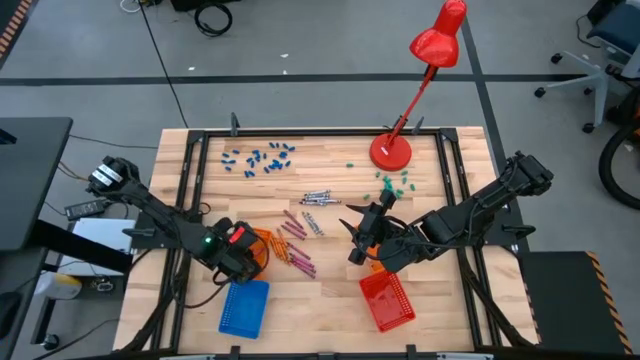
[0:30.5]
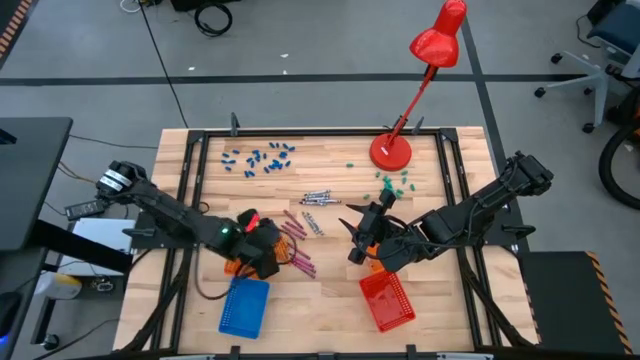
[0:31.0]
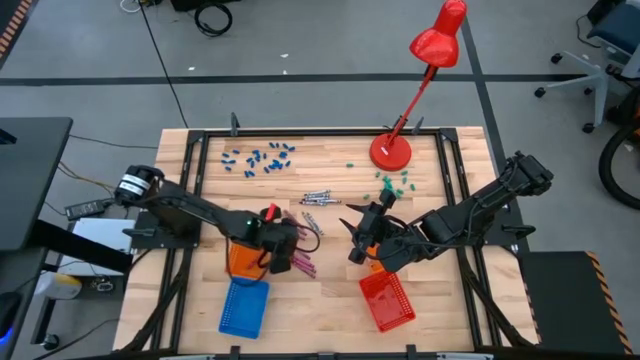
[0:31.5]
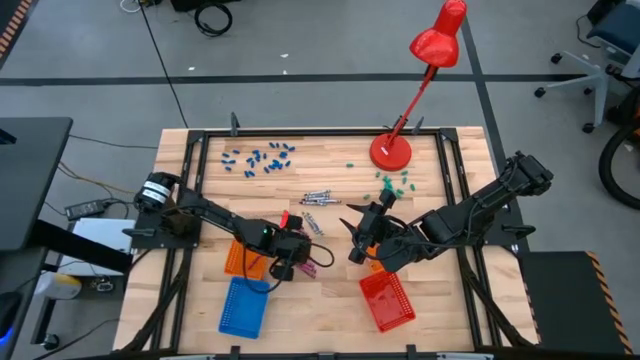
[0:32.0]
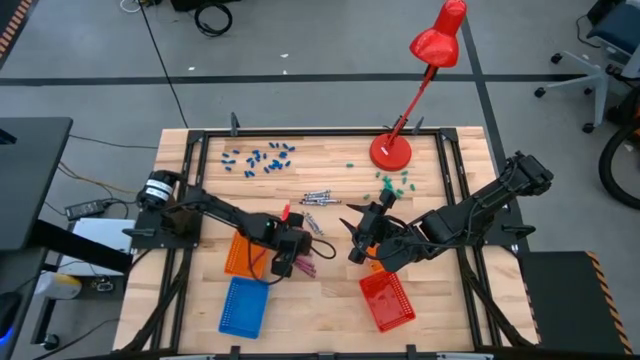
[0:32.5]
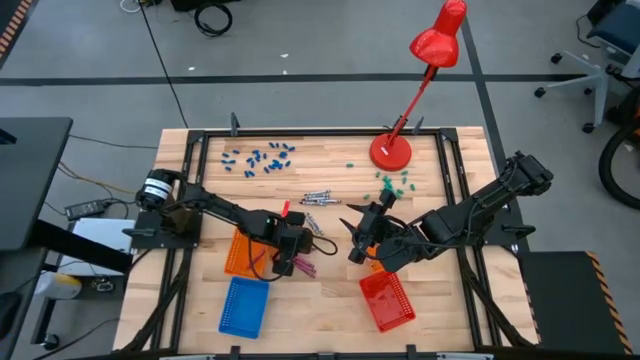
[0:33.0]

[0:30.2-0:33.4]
Task: Sort crayons
Put the red crayon into the left orange bin

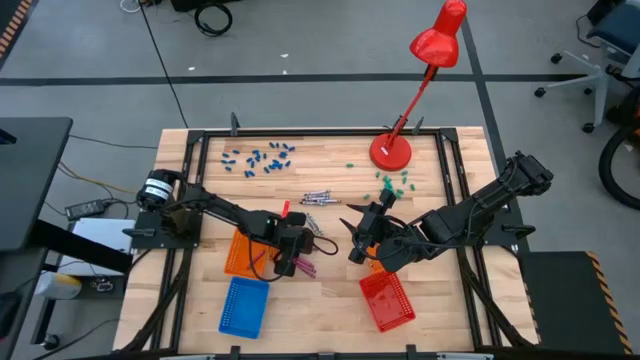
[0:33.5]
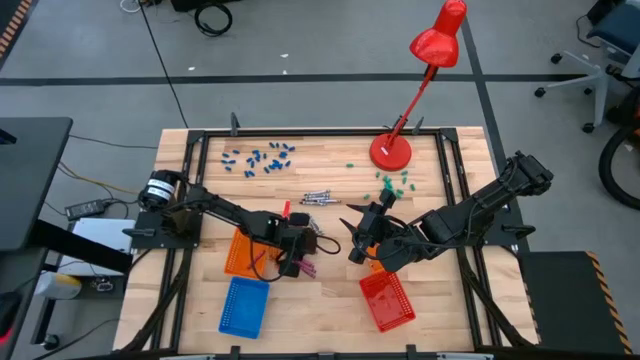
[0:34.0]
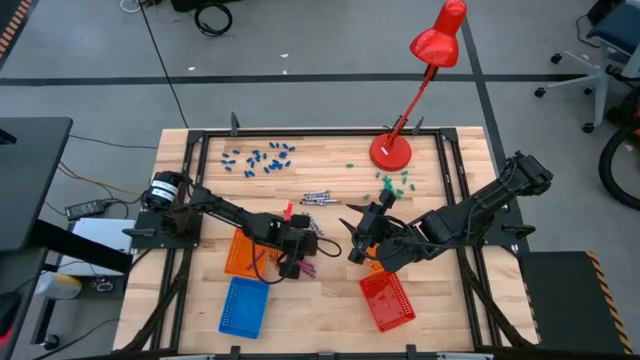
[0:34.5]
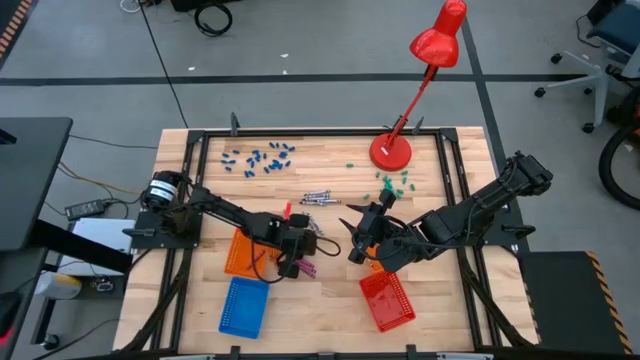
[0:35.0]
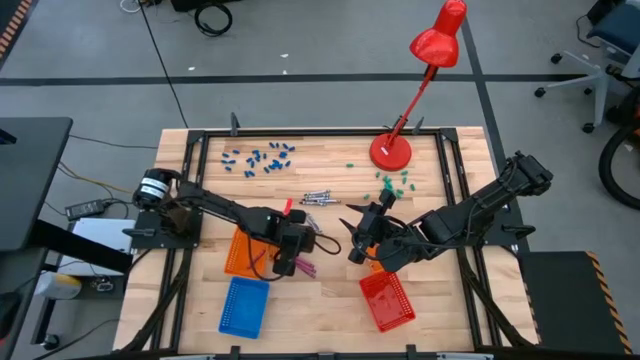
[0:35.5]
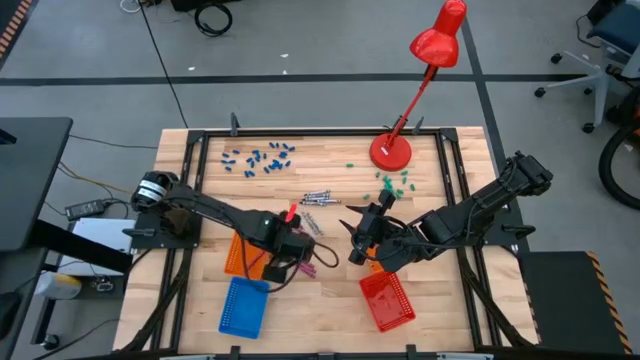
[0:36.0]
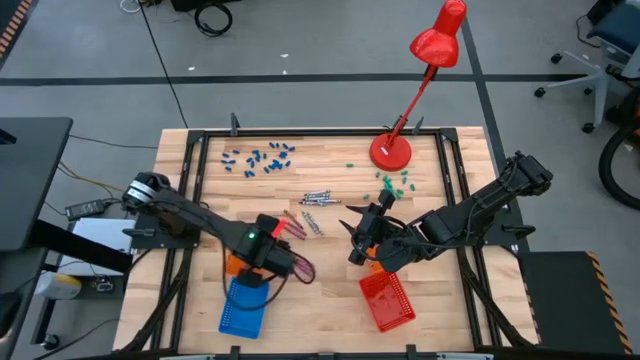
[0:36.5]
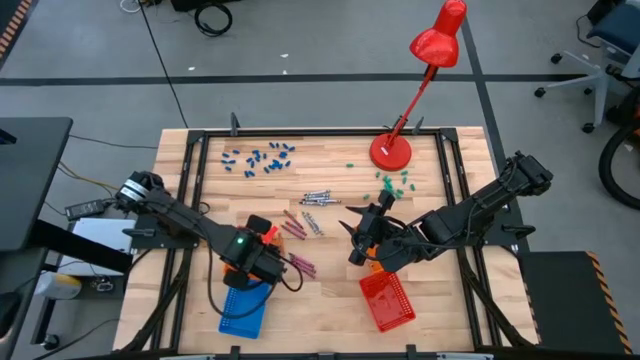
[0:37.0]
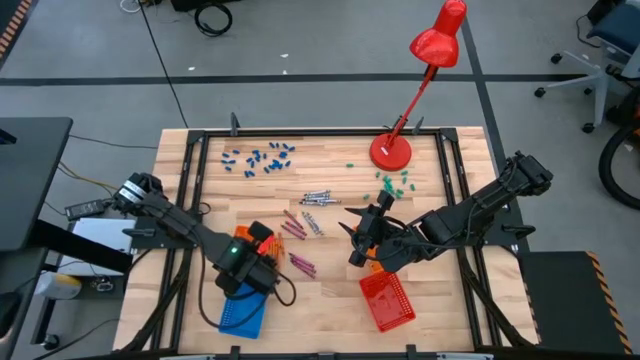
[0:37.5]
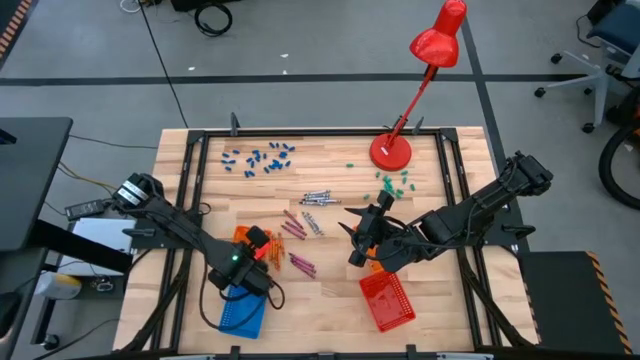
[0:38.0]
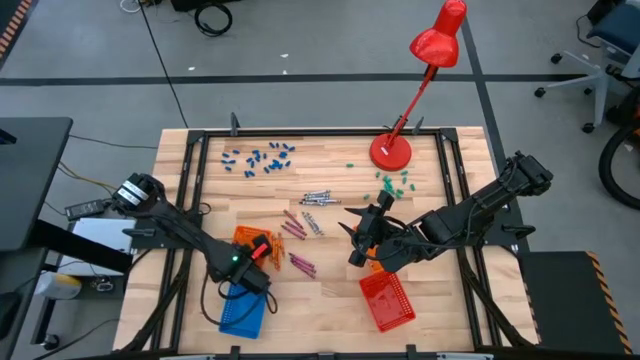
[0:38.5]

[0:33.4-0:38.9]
Put the red crayon into the left orange bin

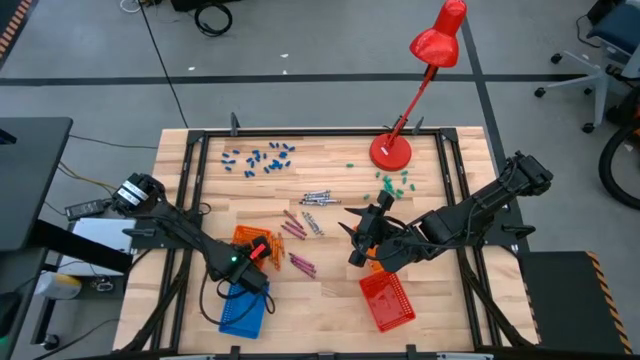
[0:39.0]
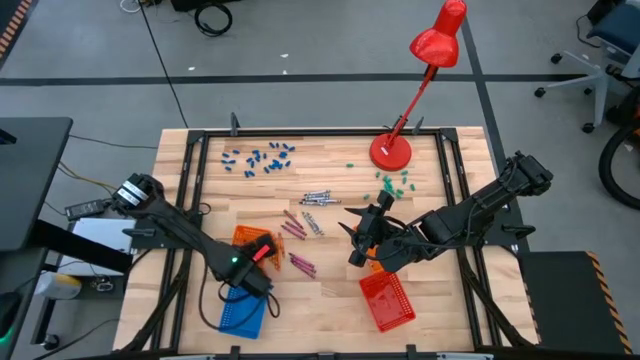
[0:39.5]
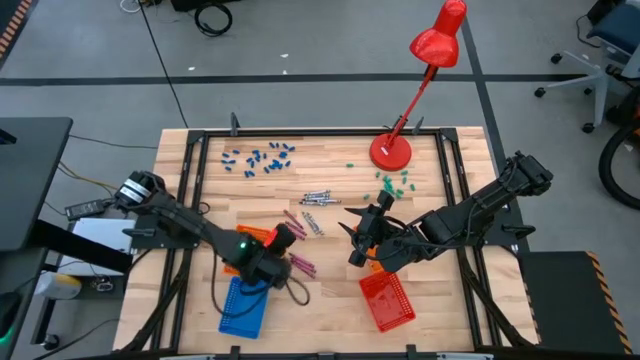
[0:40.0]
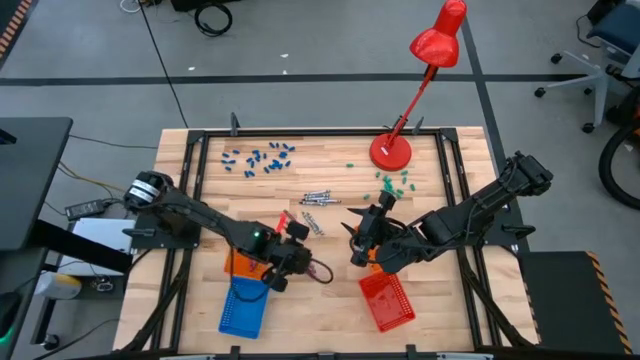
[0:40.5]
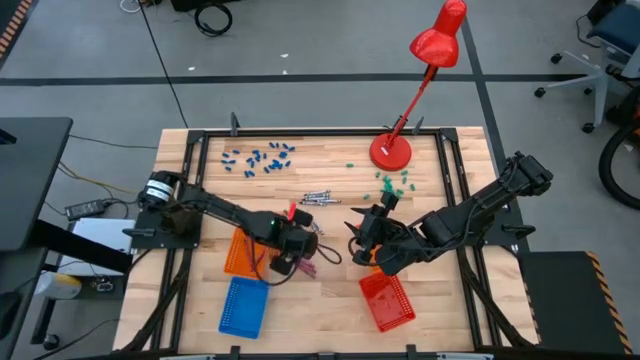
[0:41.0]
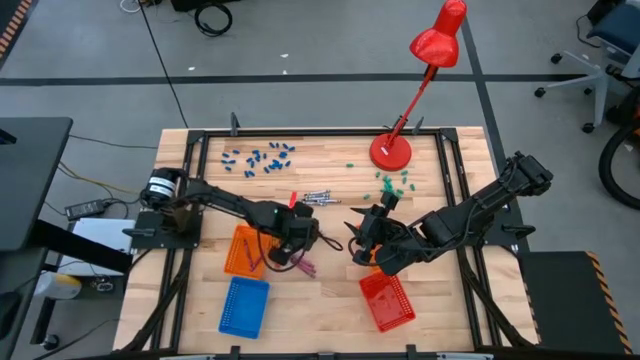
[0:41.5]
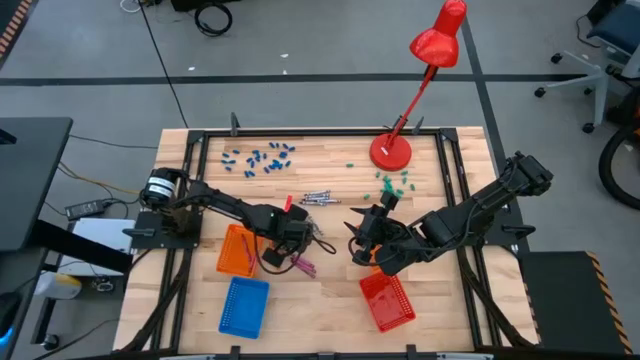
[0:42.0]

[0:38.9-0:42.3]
Put the red crayon into the left orange bin

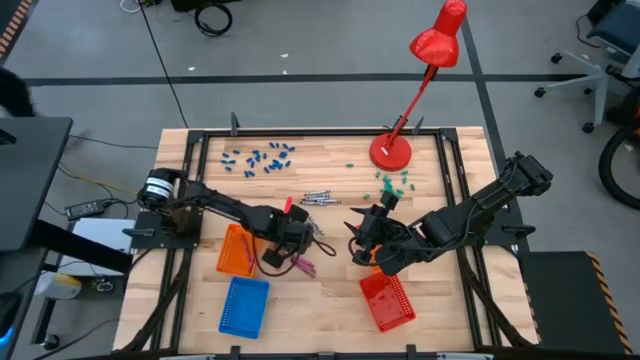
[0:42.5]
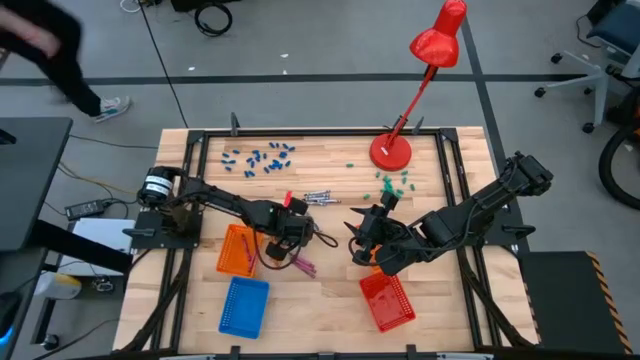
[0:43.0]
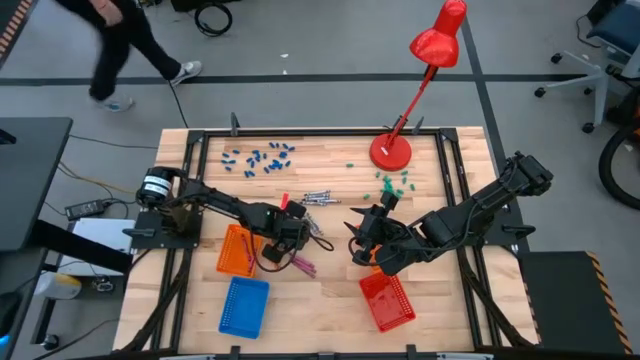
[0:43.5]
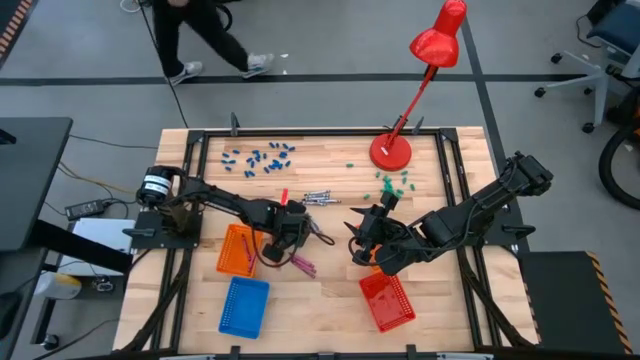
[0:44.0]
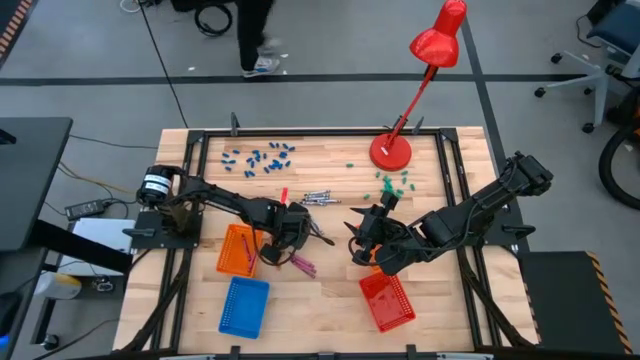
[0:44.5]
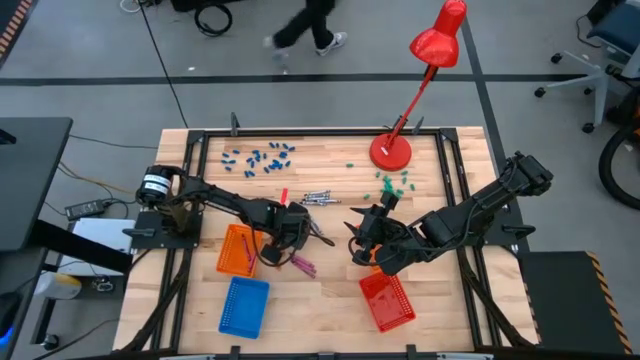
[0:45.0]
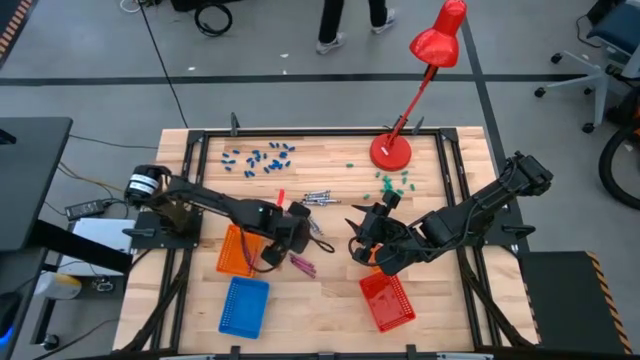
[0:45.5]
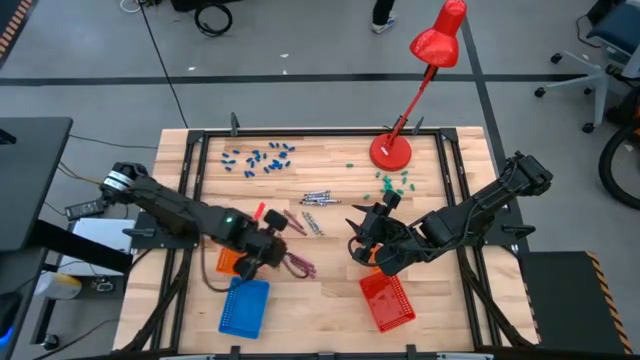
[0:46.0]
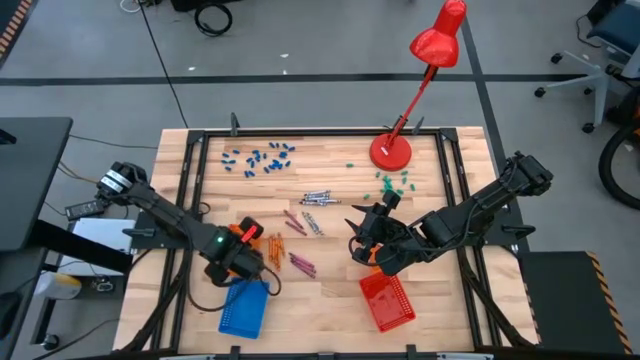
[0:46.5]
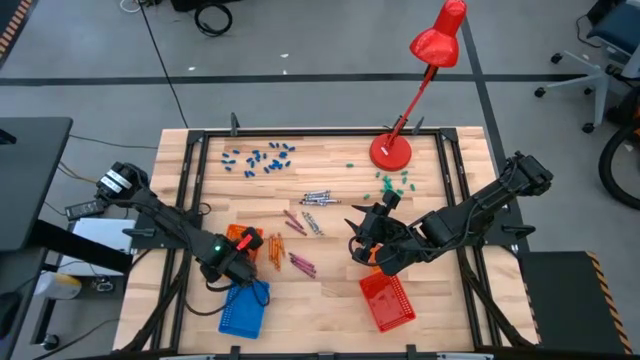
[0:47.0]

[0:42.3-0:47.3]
Put the red crayon into the left orange bin

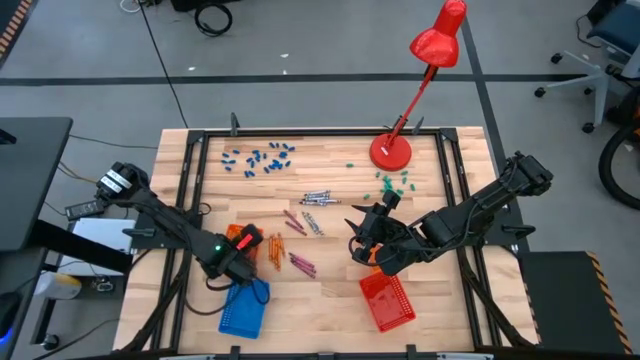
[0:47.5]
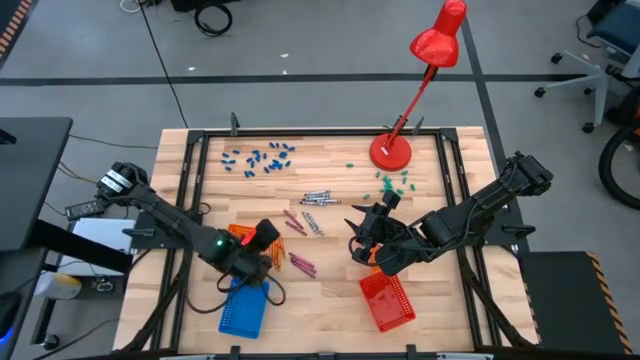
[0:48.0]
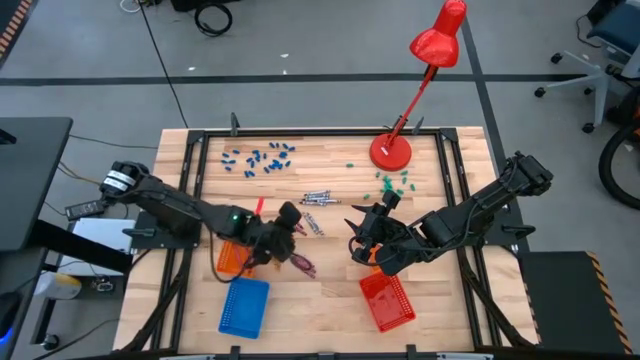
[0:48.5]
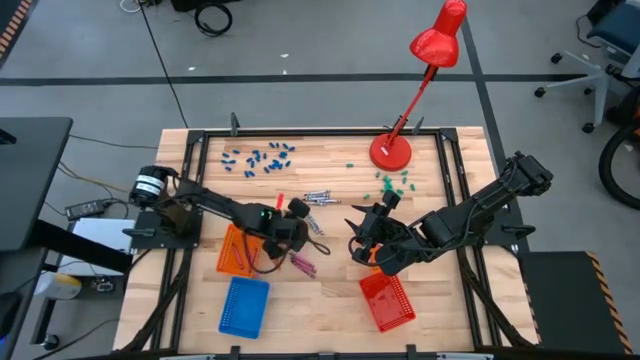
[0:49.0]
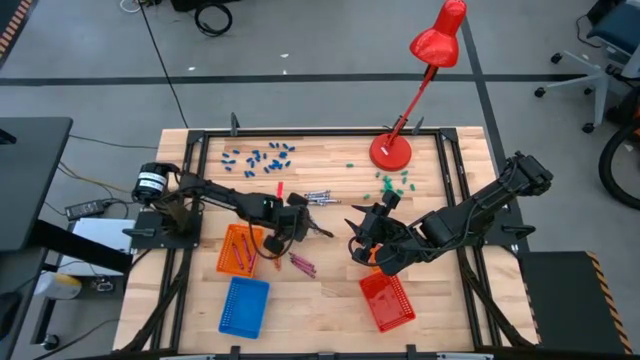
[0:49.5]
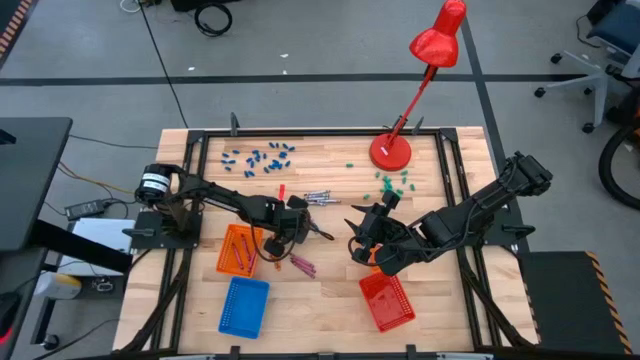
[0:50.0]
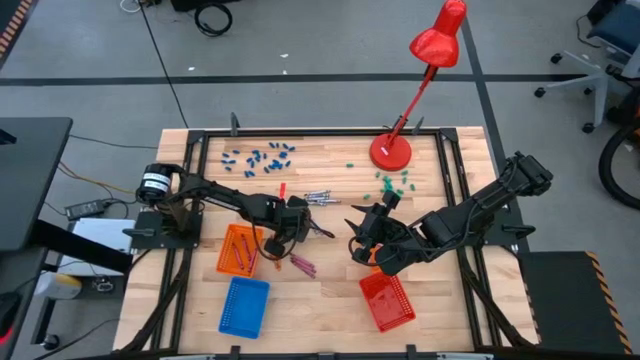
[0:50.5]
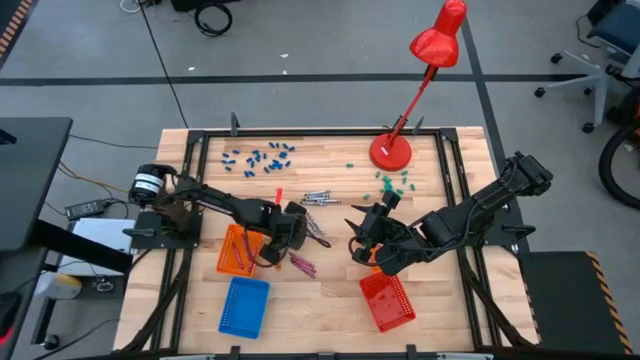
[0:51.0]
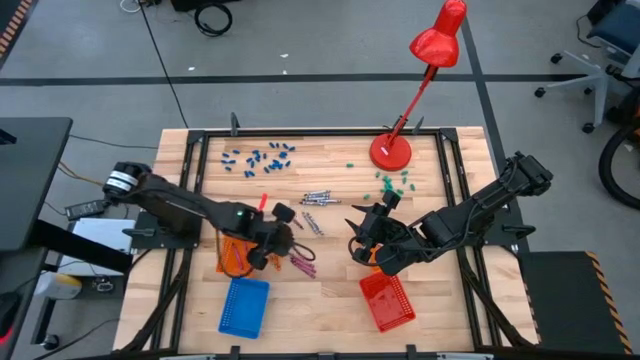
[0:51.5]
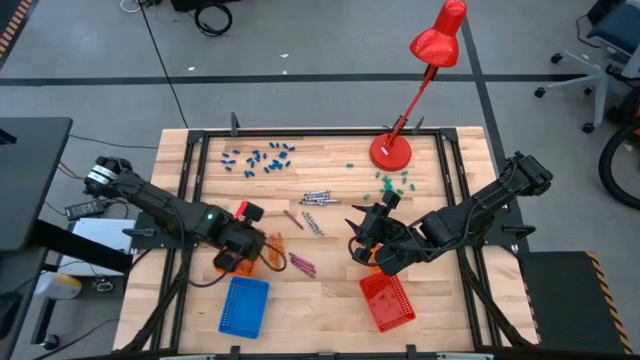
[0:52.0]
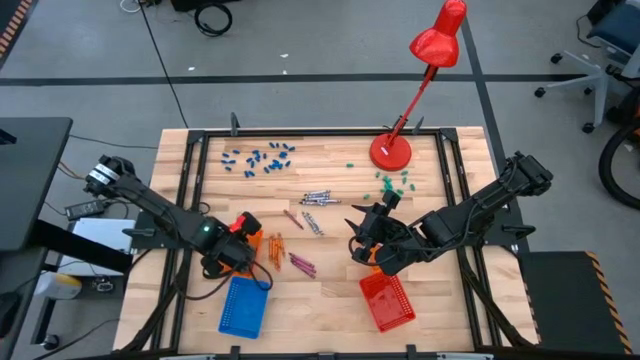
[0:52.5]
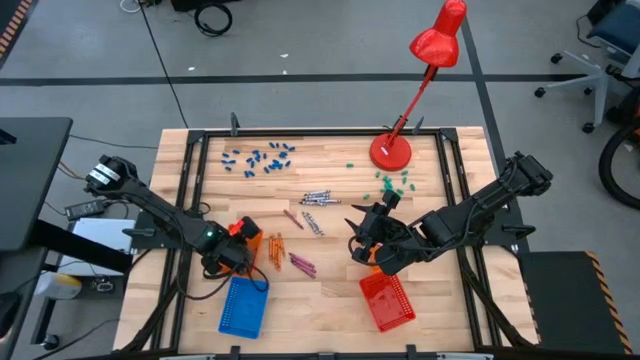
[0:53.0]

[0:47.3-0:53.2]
Put the red crayon into the left orange bin
